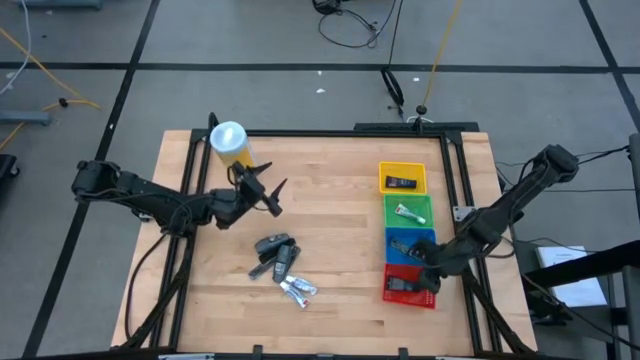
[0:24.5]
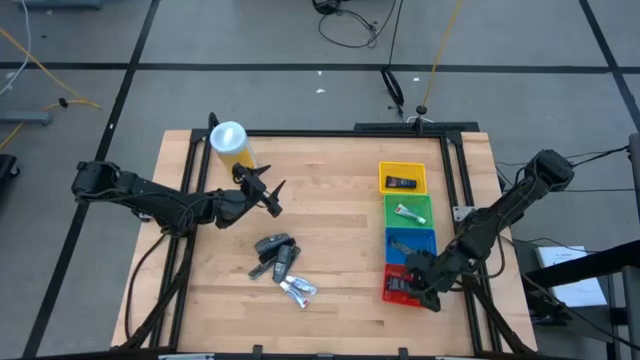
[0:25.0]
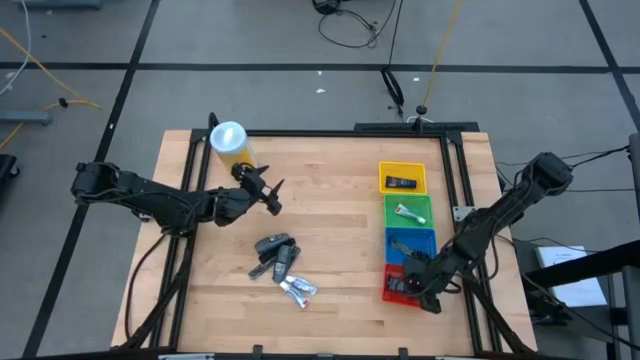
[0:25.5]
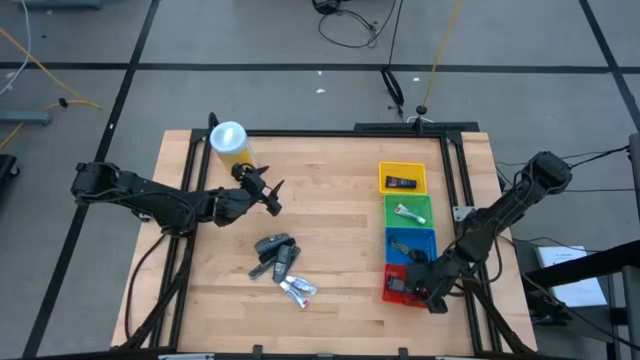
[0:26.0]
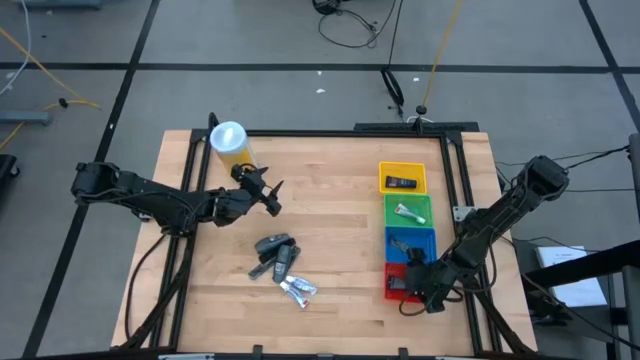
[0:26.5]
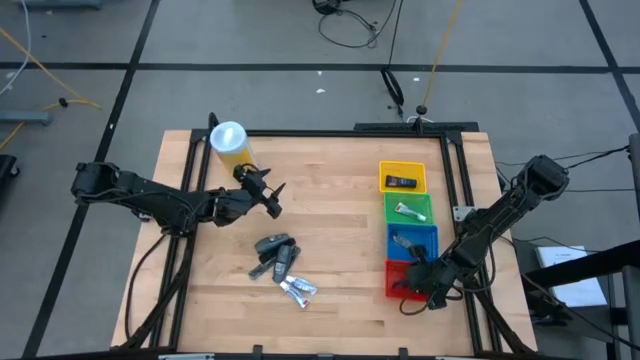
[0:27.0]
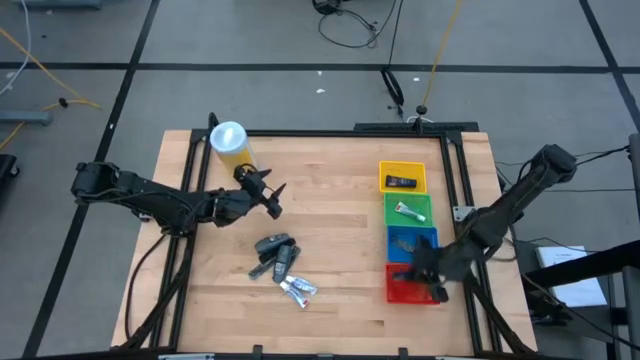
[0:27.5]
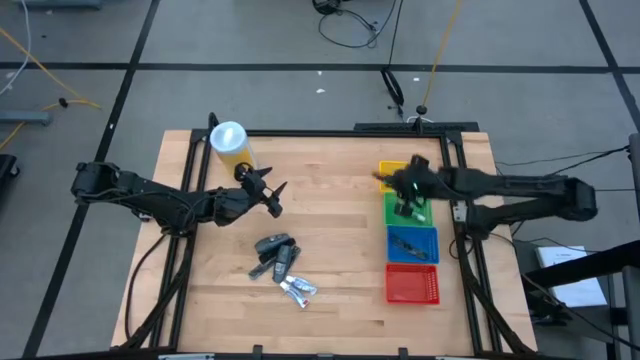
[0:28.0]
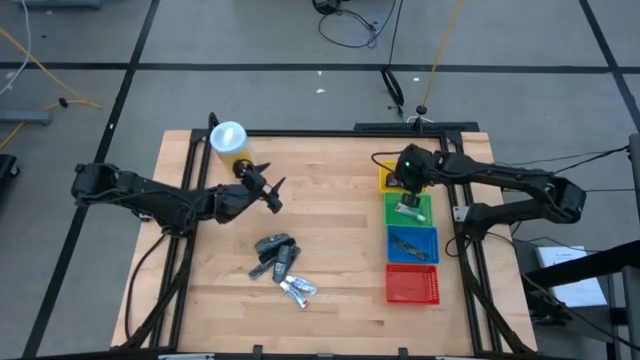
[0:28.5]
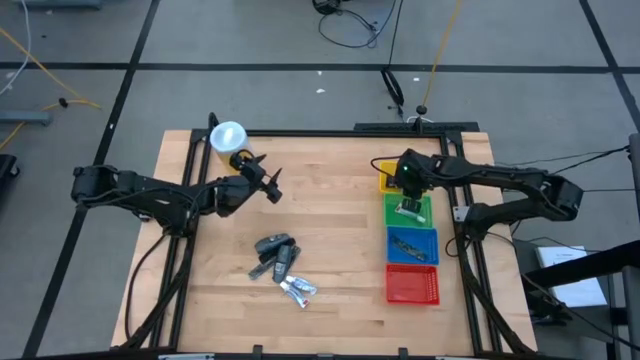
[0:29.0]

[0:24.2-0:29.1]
Task: Pick & Place Travel size toiletries
Put the blue shave cream into the yellow bin

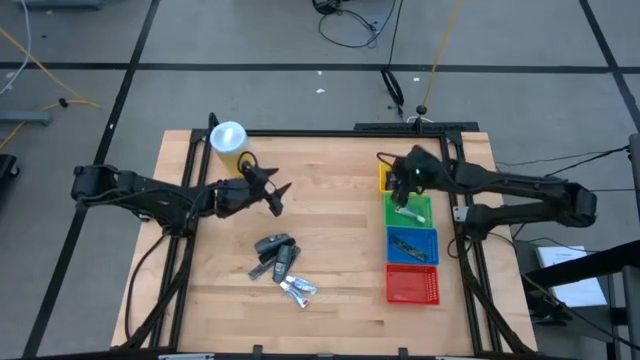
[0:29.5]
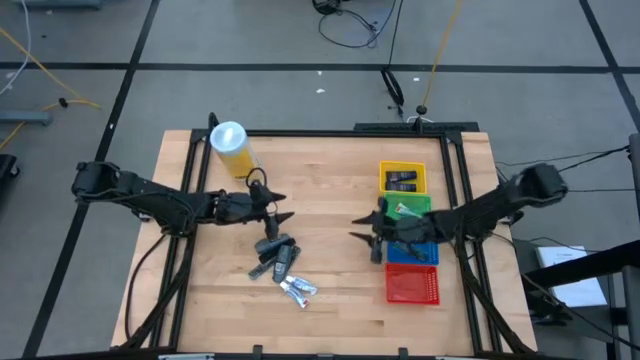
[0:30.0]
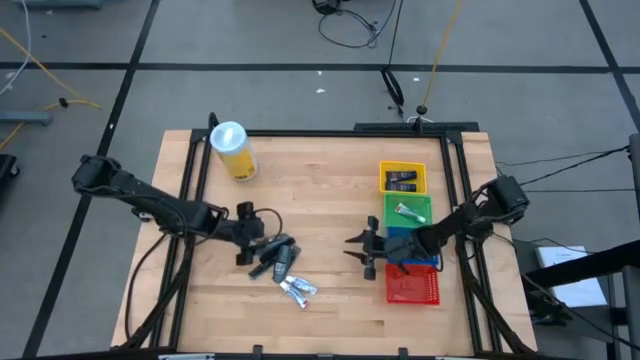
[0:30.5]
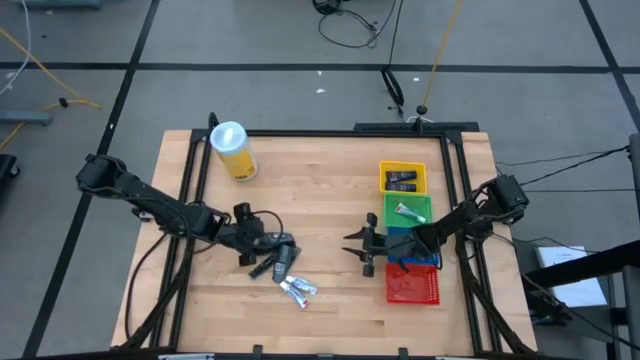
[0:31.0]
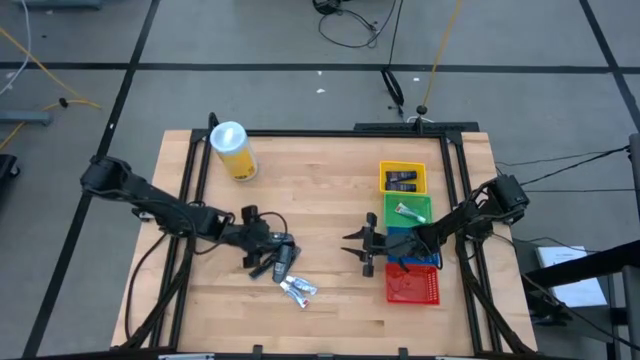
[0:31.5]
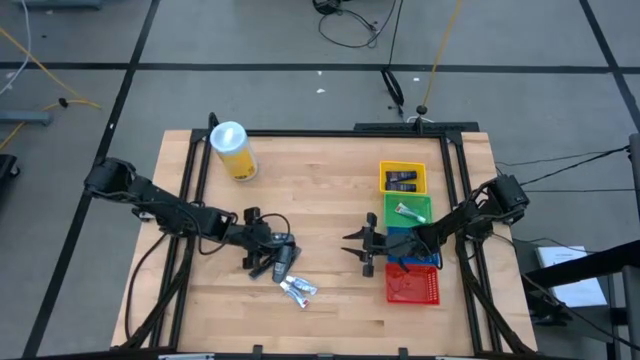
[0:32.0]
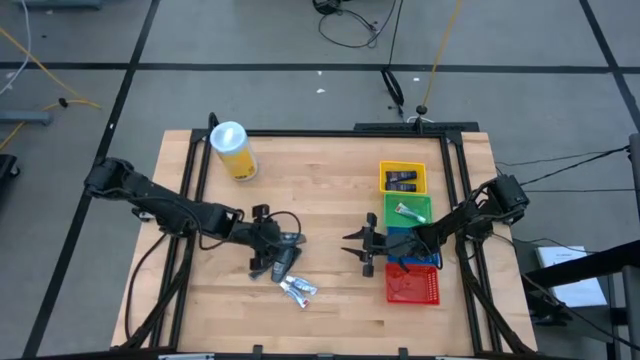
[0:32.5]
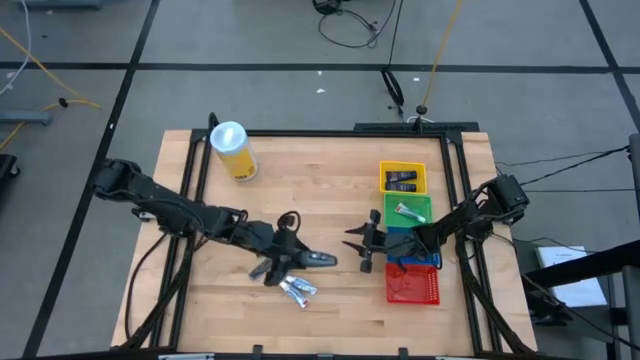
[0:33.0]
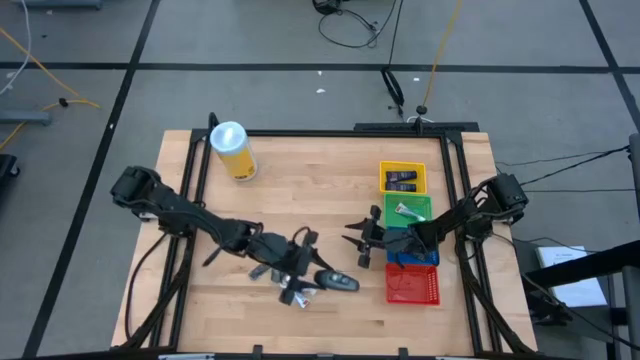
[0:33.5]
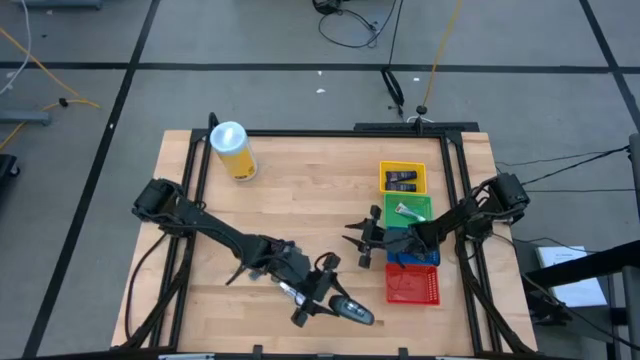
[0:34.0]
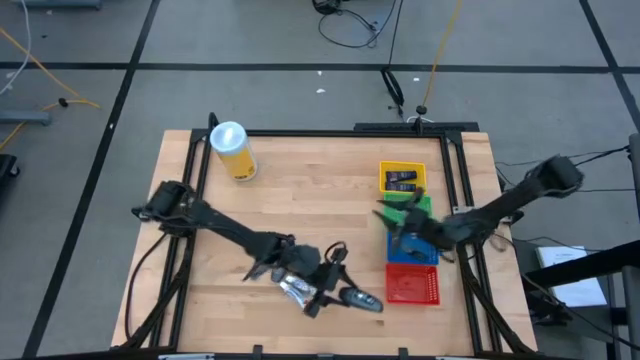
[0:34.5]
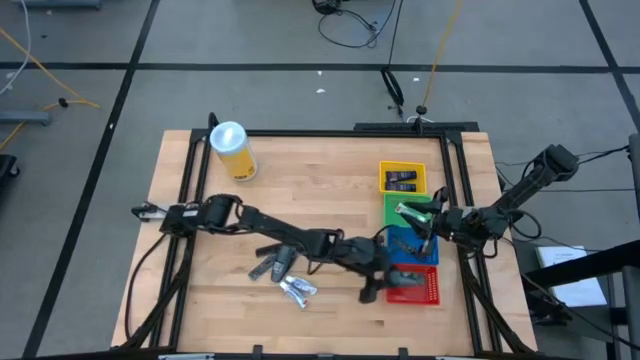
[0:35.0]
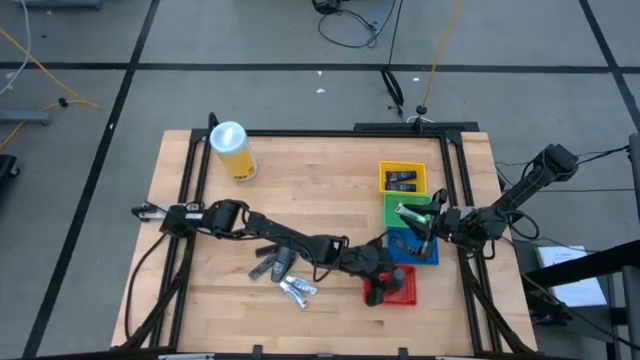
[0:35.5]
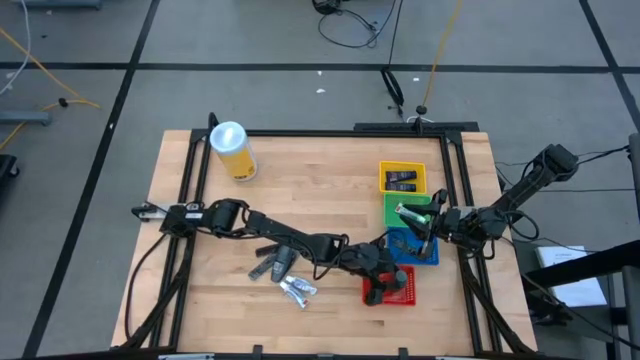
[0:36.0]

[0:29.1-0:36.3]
Put the gray deodorant roll on bottle into the orange bin

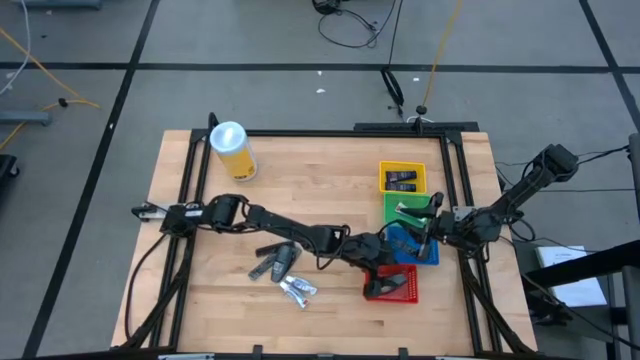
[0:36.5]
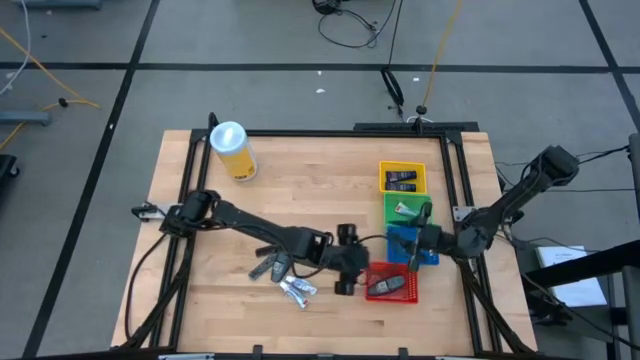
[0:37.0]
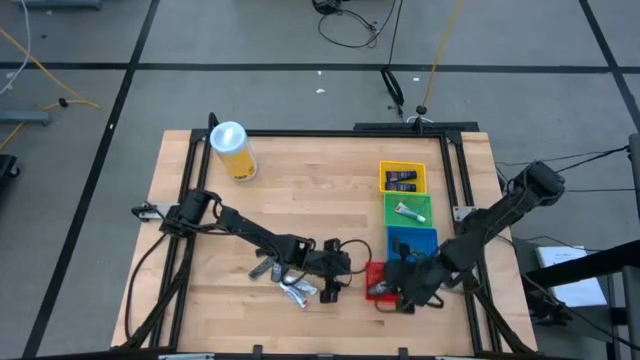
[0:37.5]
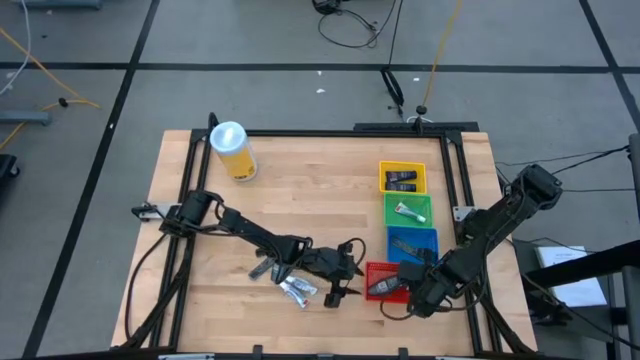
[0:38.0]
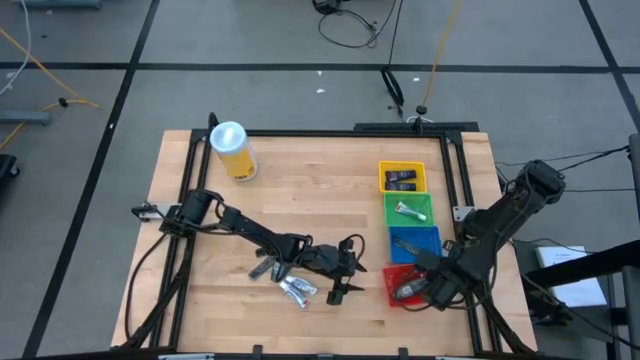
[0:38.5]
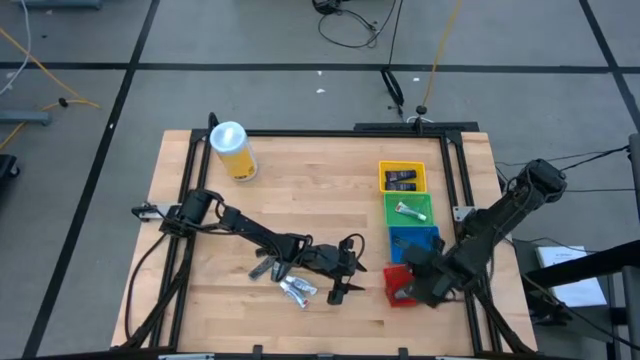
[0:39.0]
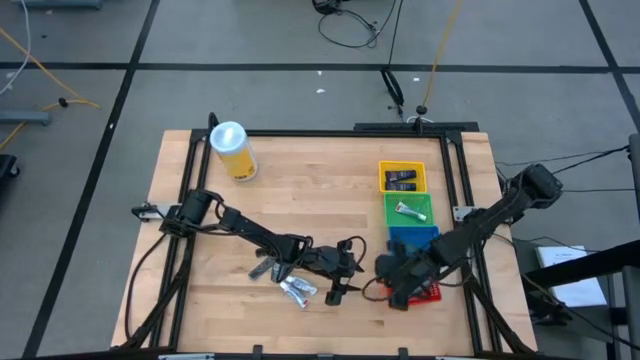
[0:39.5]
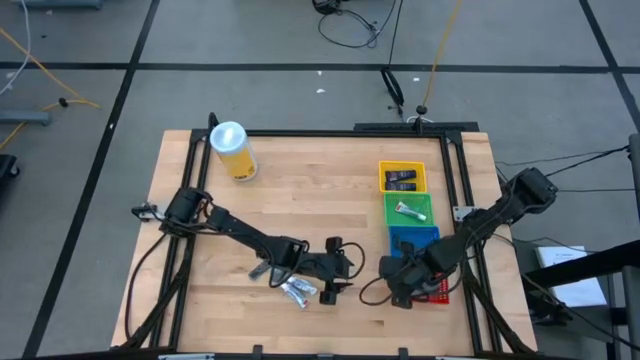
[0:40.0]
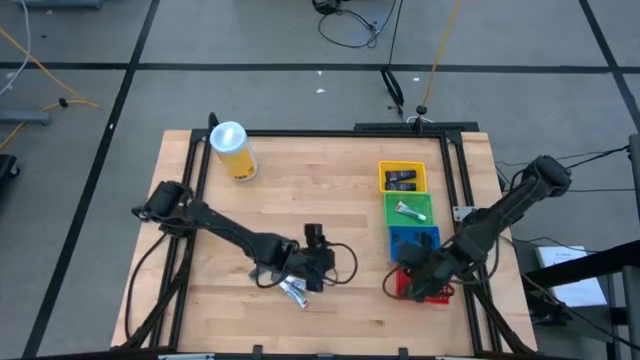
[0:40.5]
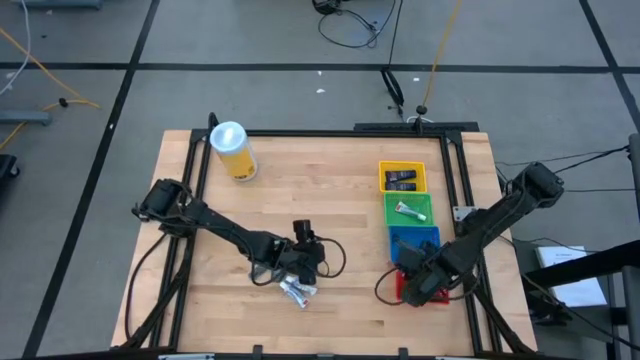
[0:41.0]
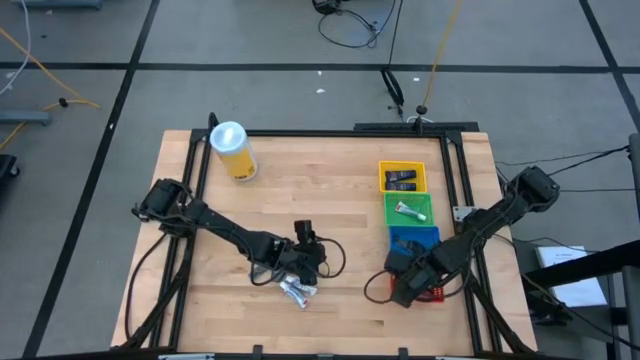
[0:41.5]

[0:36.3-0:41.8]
Adjust the red bin

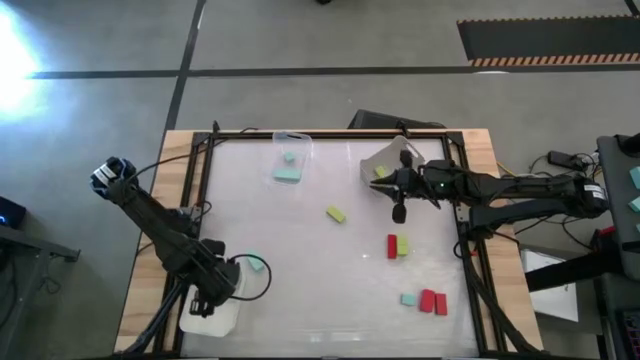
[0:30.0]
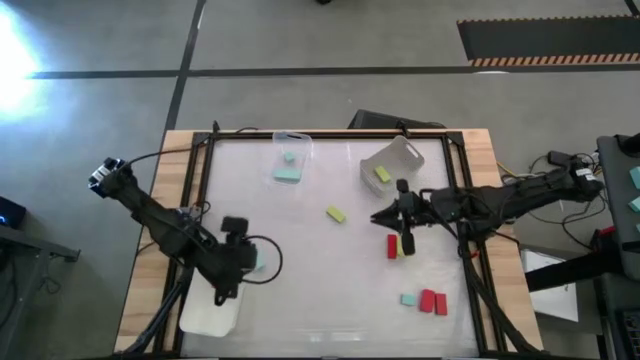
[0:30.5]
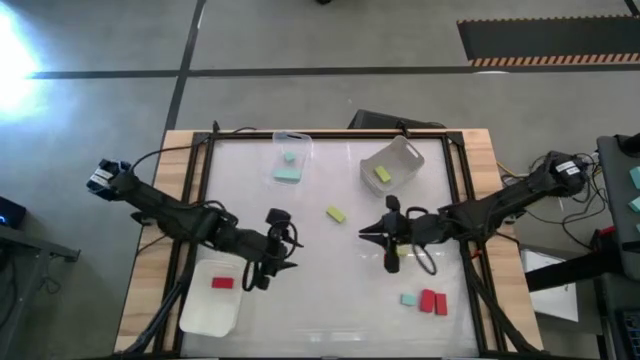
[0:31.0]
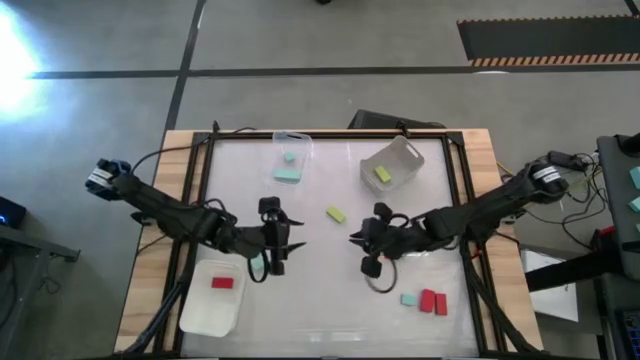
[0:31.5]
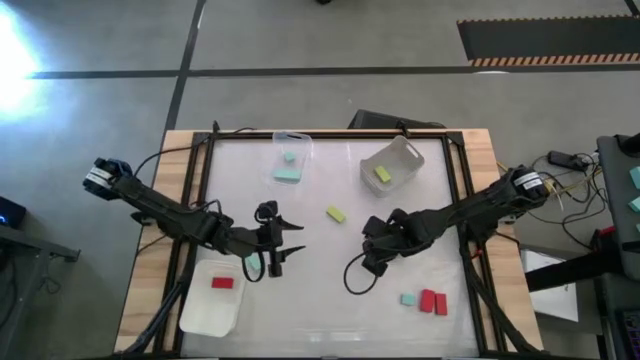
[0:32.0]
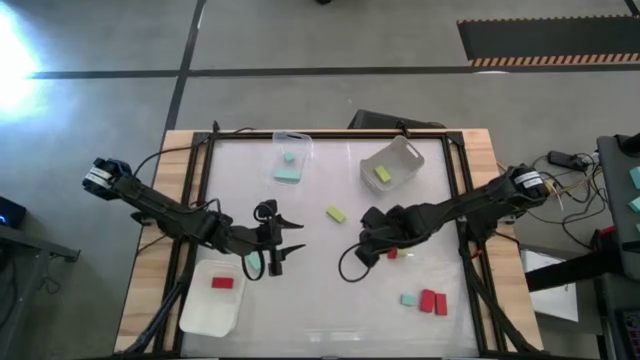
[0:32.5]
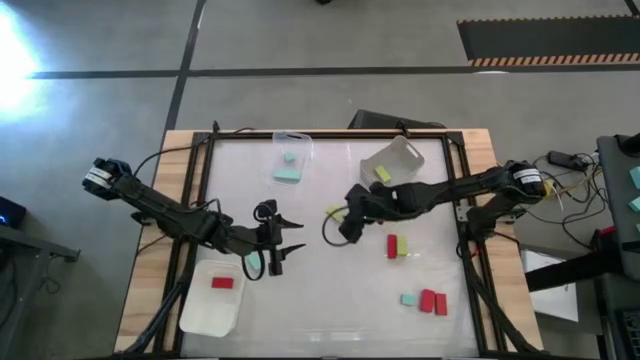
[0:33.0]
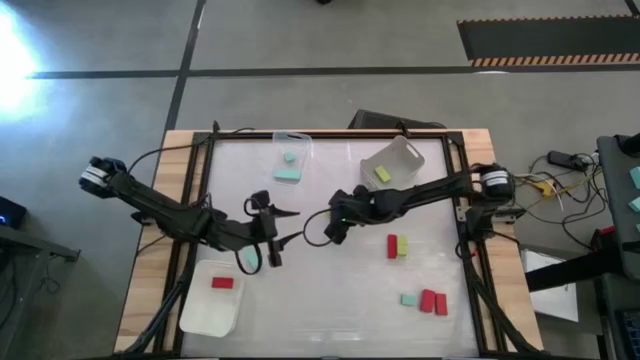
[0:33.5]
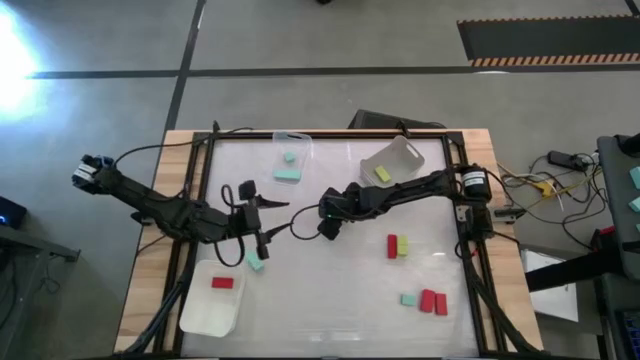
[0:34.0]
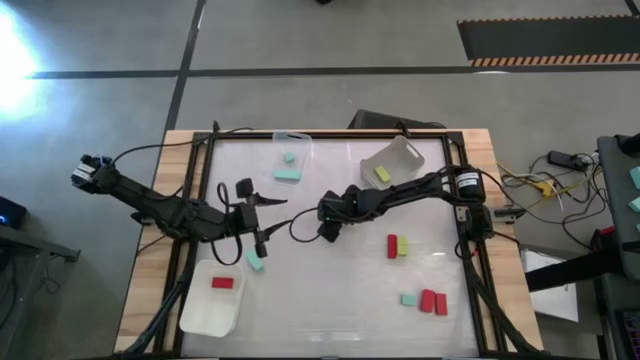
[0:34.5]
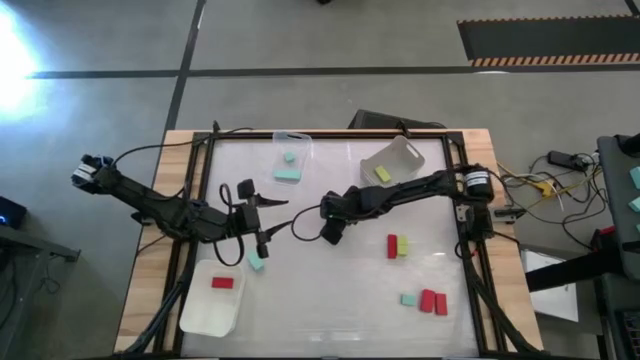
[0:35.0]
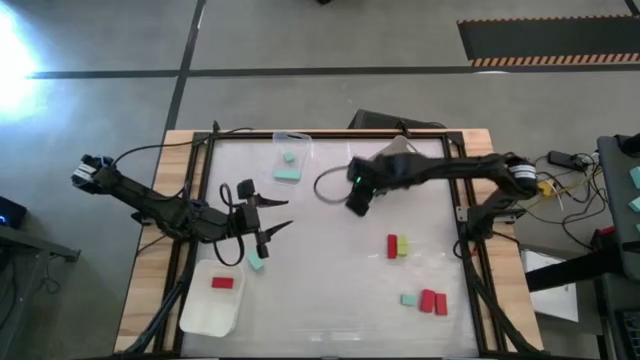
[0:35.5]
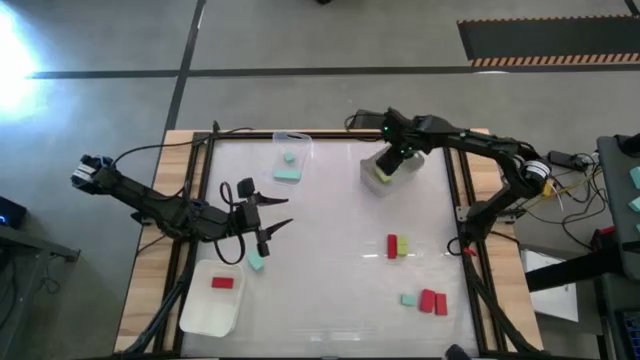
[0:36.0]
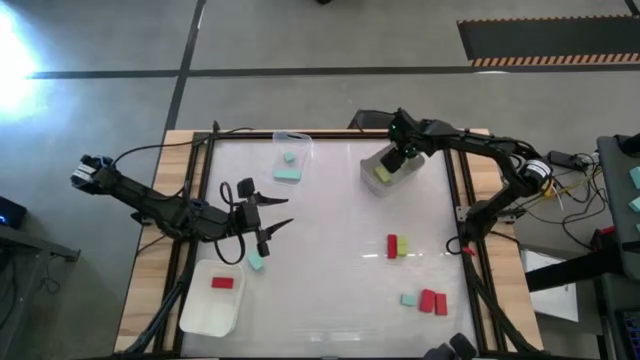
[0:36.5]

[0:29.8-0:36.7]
Task: Sort & place blocks by color
Put the green block into the gray bin
